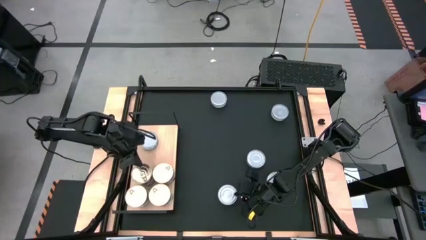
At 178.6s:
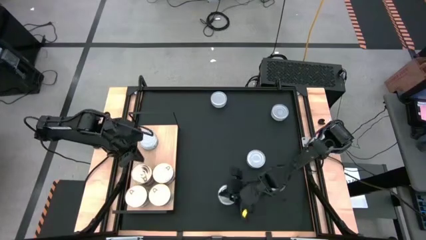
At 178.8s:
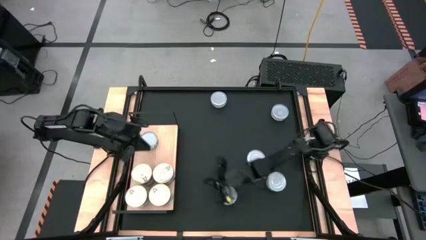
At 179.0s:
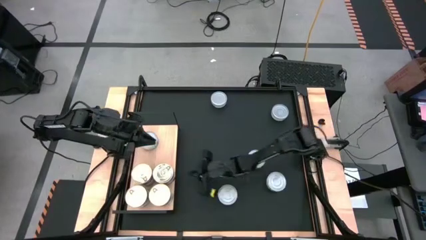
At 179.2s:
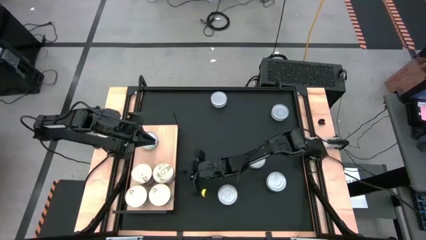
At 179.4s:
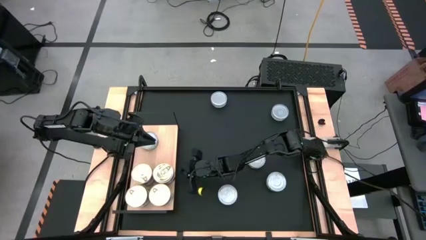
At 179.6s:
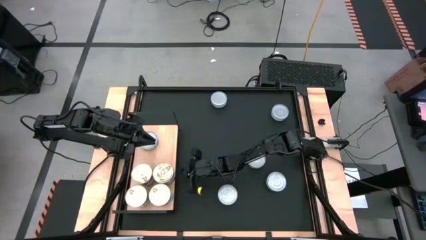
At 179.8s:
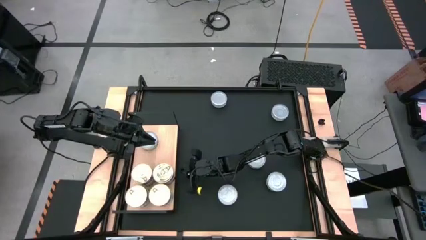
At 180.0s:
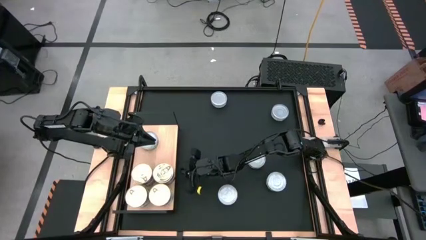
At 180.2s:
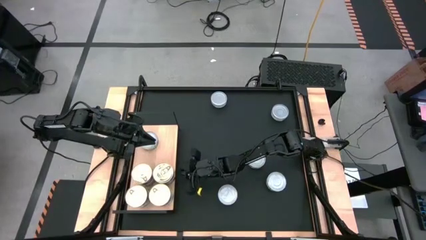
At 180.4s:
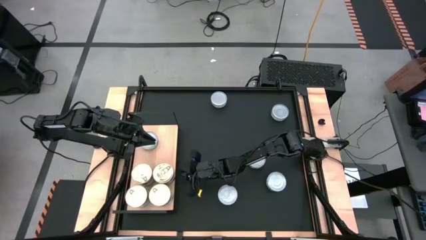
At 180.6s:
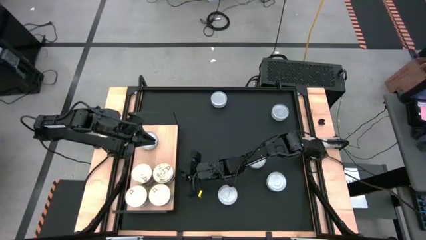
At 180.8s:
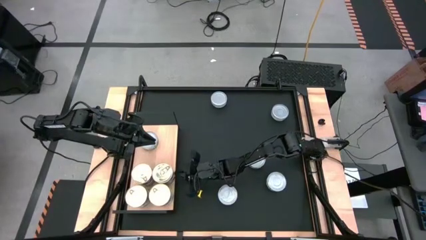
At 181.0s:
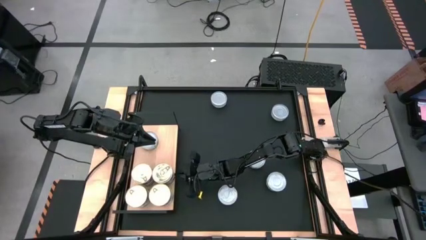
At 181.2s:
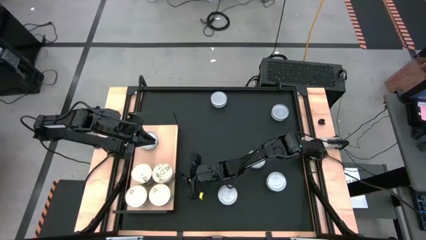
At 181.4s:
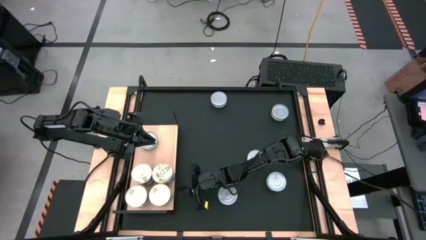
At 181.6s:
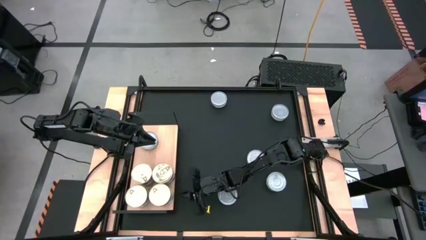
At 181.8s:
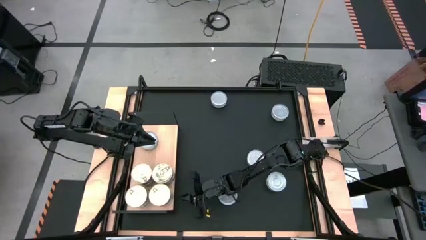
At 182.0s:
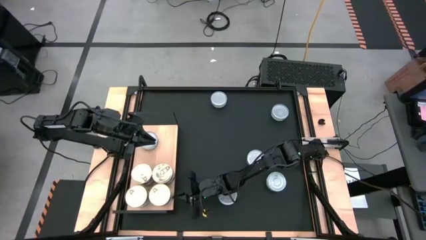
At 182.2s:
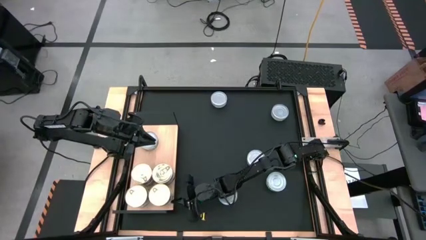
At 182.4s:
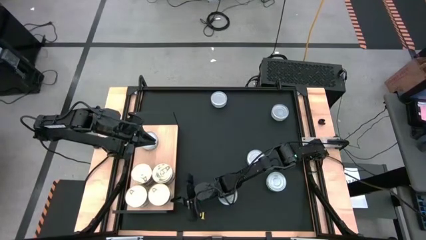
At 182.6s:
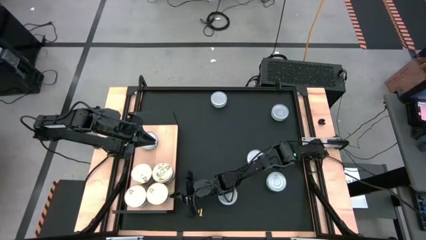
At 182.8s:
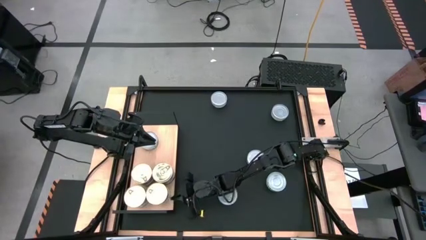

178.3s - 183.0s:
Task: Stack canned seafood by type on shelf
Adjust the blue tuna cans

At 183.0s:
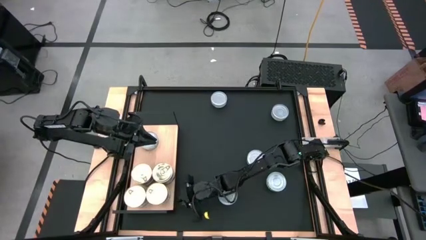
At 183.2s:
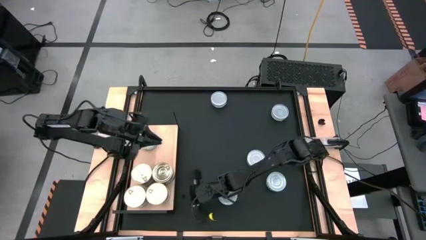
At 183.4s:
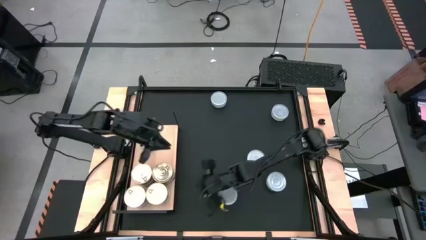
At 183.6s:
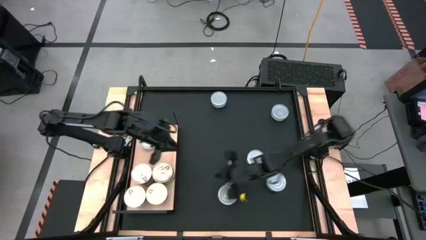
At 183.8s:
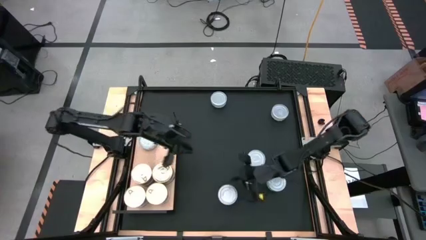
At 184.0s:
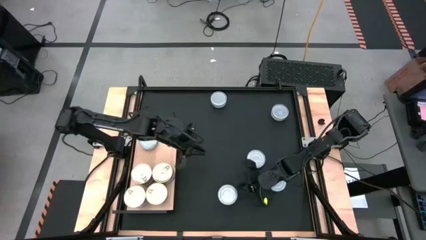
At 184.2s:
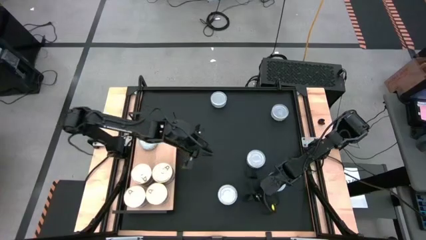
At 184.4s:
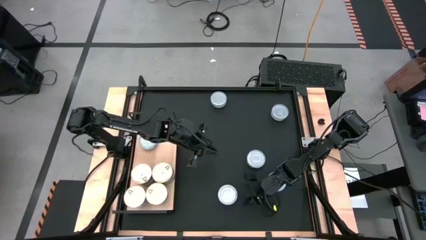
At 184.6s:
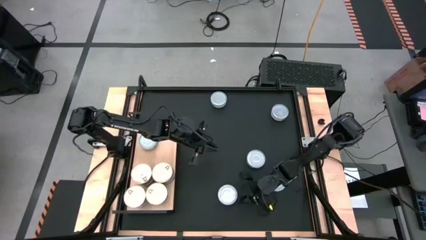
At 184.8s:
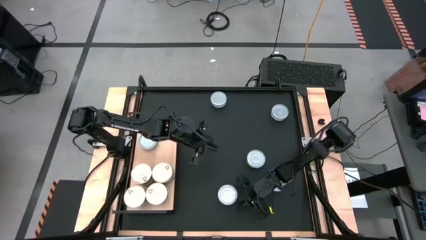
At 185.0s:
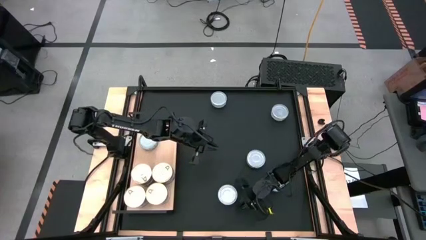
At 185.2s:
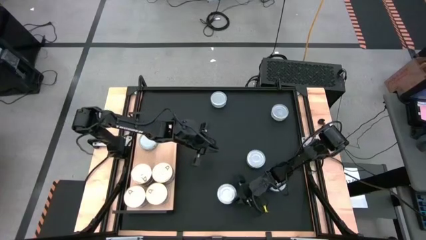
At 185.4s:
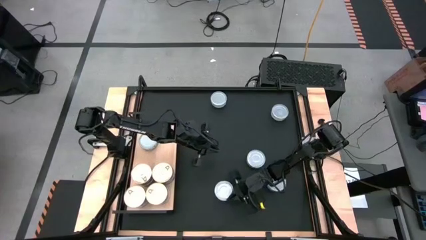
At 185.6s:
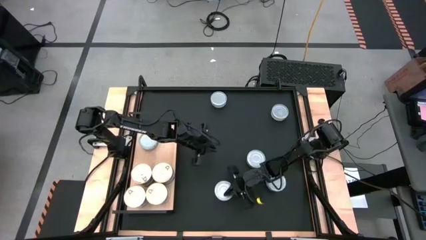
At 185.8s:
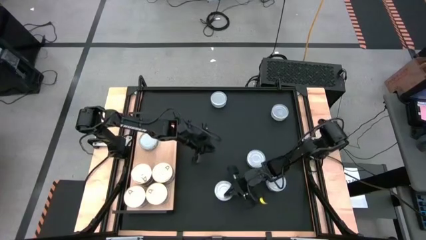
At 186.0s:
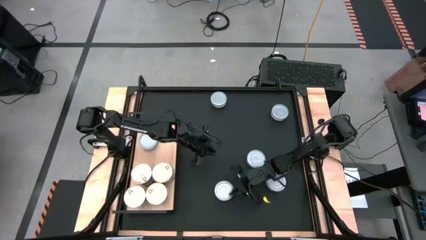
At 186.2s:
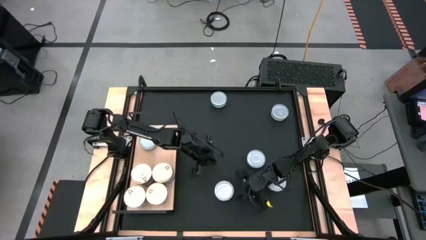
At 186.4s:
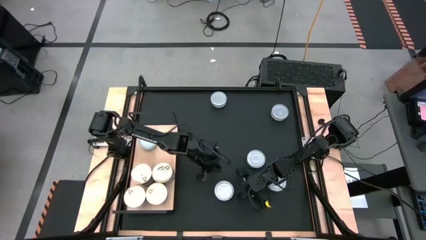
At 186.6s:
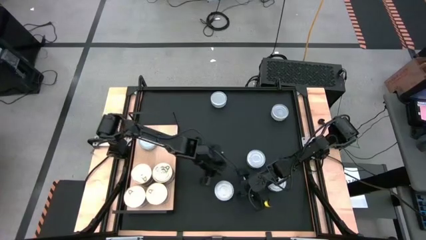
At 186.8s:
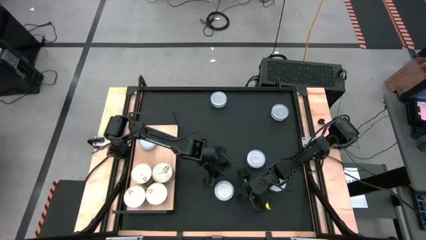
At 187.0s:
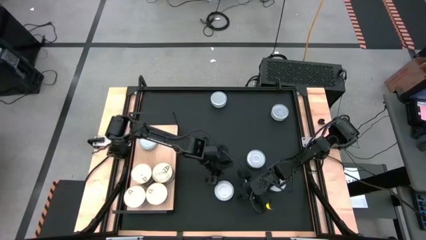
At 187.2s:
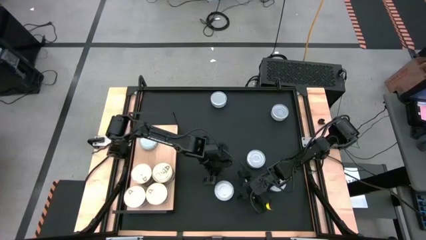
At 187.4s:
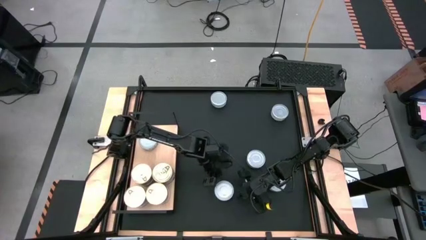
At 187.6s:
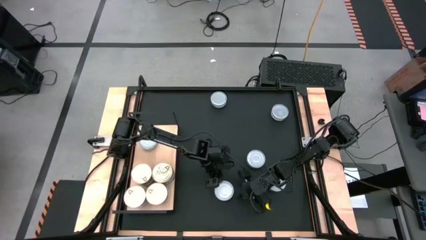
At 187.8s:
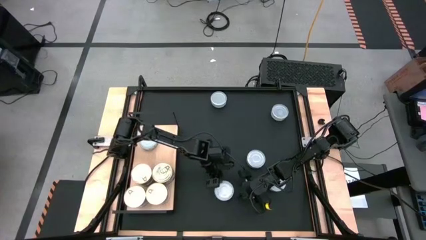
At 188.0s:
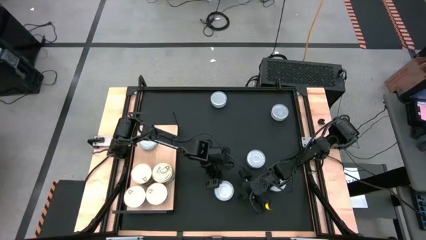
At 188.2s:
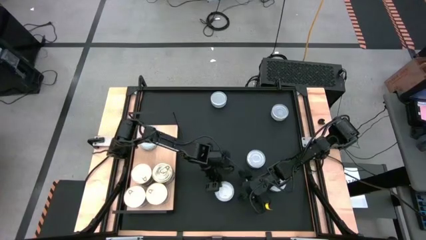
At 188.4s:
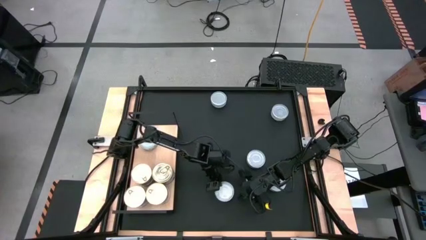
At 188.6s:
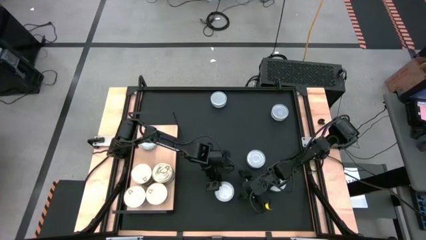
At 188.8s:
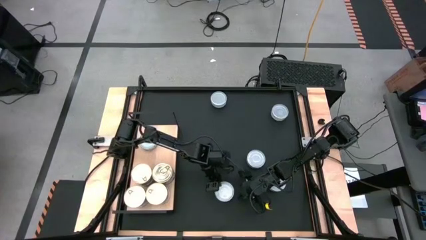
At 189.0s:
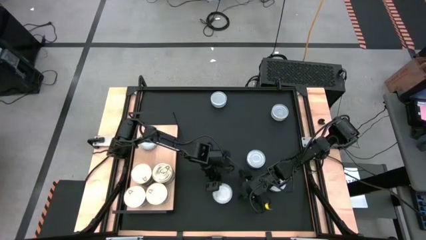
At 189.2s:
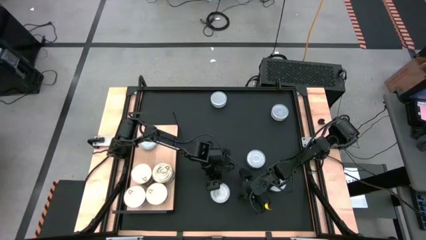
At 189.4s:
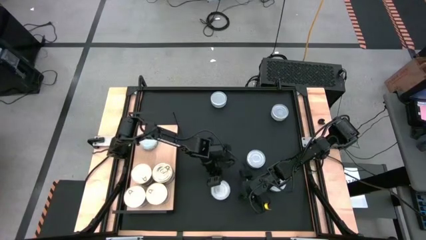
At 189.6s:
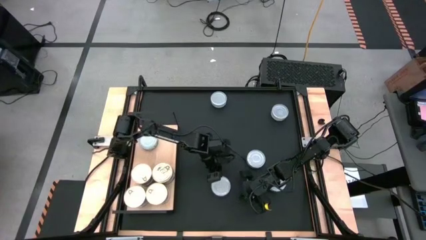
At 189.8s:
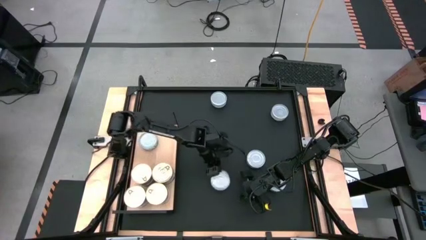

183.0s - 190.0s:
Put the green tuna can aligned with the other green tuna can on the shelf

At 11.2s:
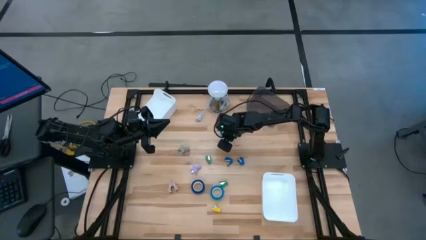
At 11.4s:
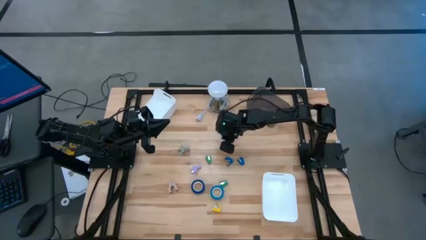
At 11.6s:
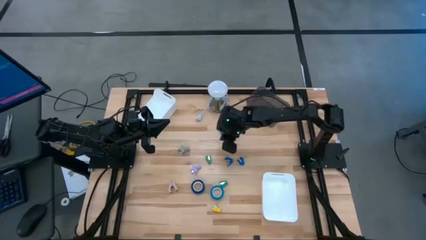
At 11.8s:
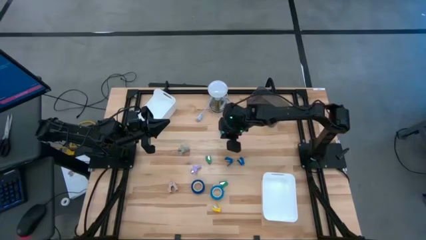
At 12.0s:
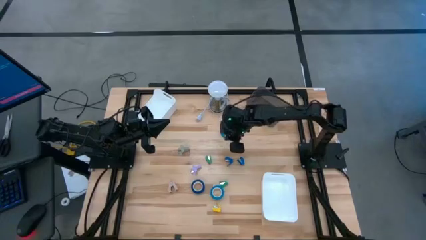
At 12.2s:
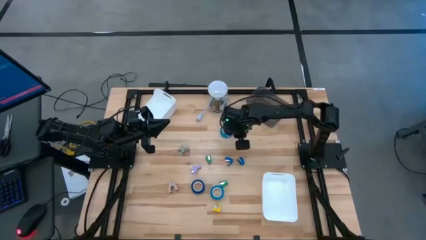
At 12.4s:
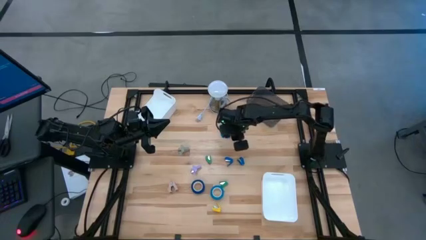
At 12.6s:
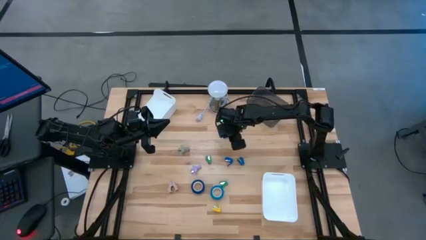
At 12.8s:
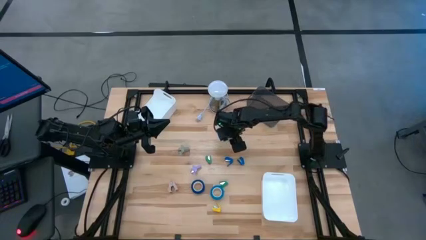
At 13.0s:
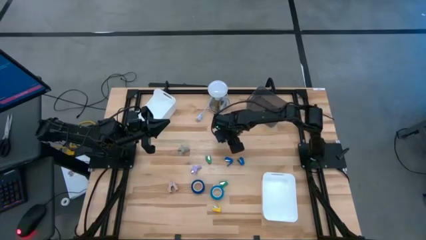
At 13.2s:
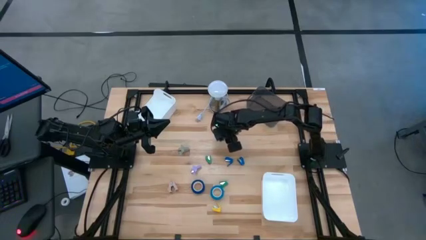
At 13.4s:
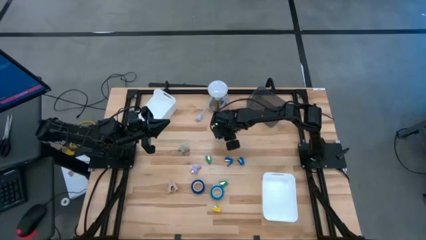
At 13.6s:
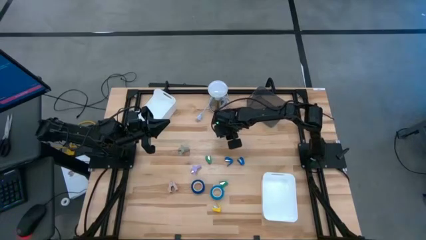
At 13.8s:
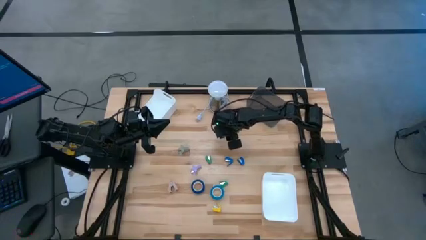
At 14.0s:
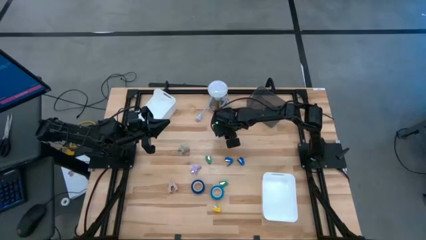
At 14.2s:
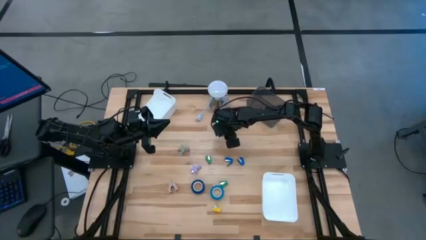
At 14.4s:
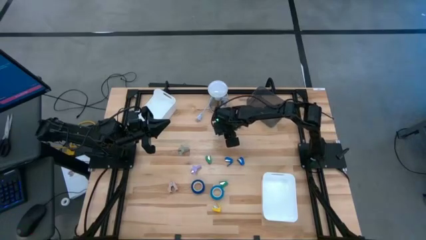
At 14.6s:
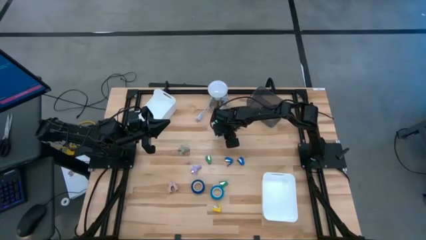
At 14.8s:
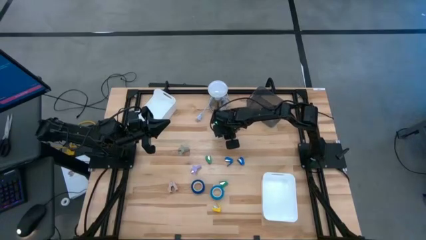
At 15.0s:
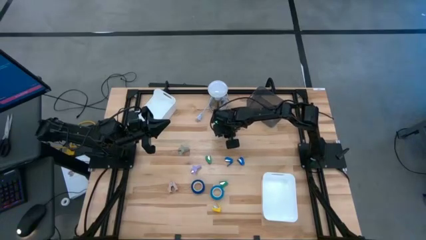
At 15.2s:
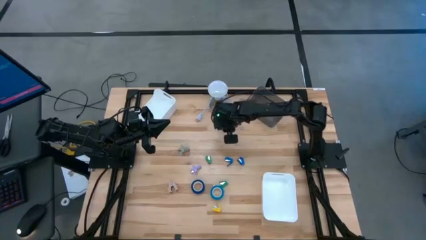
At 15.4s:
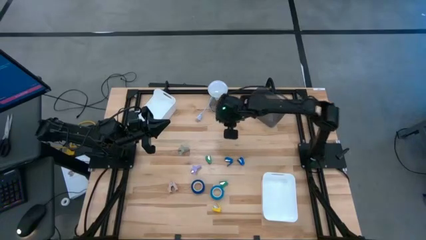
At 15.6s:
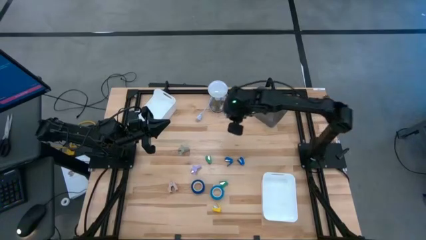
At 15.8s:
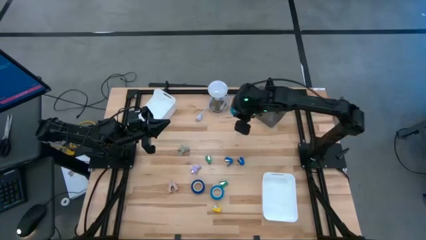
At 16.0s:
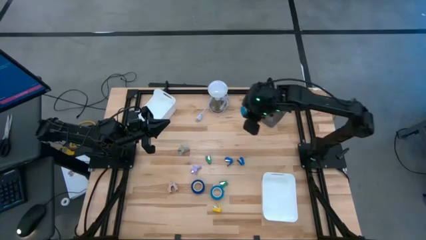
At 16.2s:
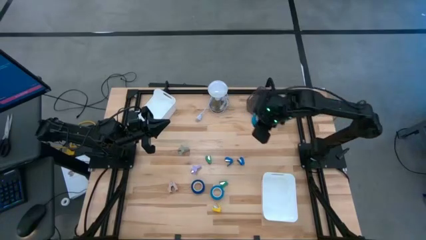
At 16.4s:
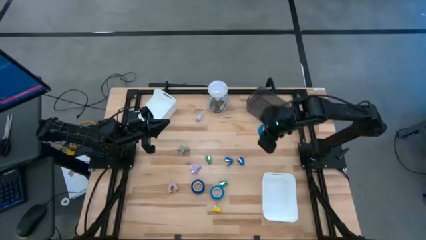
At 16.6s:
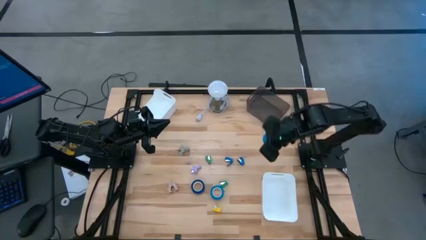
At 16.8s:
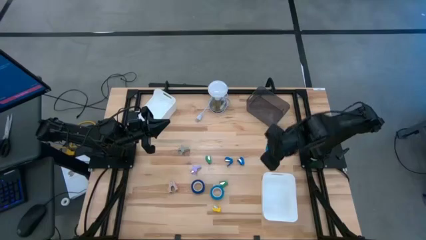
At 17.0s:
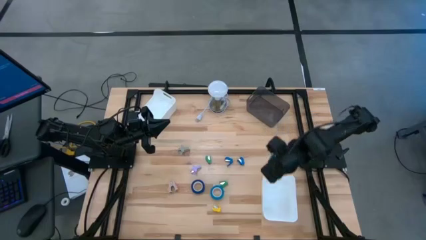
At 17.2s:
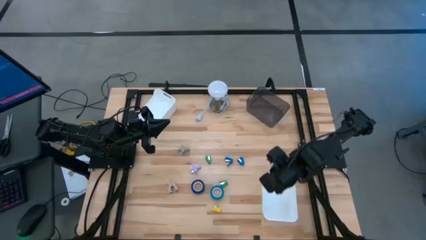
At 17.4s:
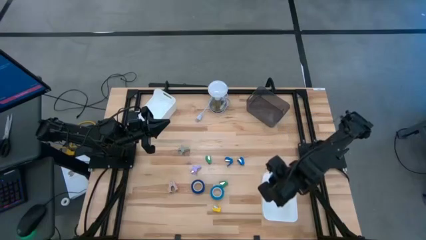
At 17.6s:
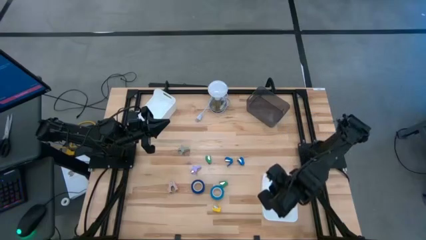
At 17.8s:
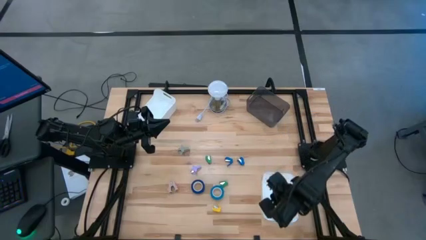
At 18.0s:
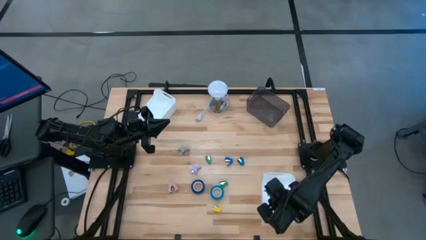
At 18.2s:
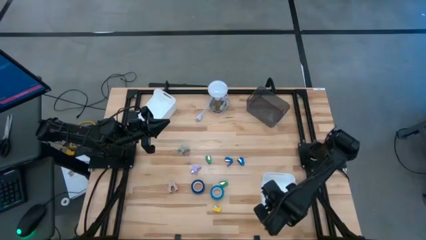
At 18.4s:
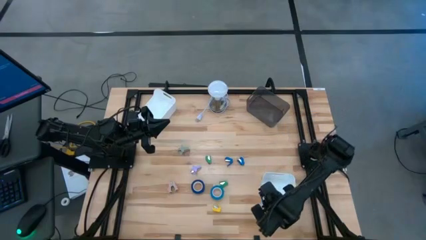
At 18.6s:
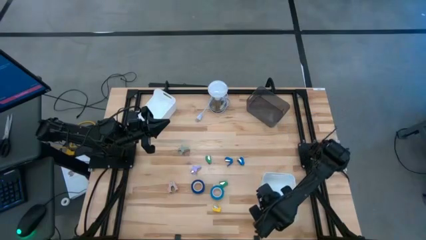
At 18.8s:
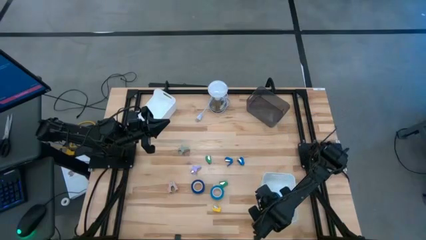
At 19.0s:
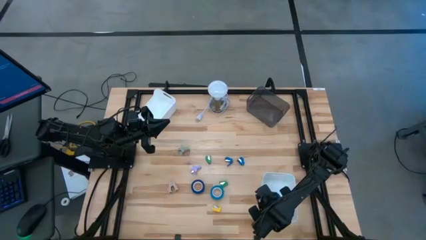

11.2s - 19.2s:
Task: Pick and place Stapler, Stapler remover, tape
Put the top light blue tape into the bottom white bin
